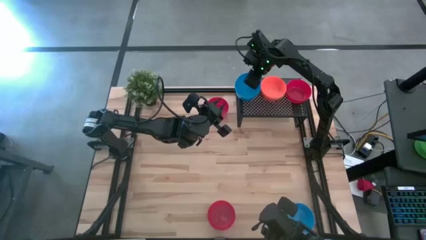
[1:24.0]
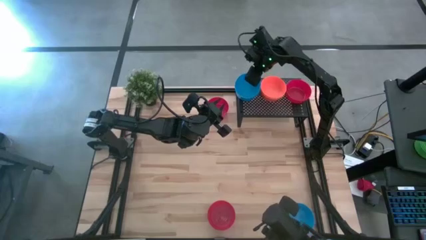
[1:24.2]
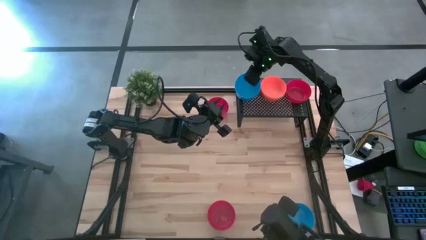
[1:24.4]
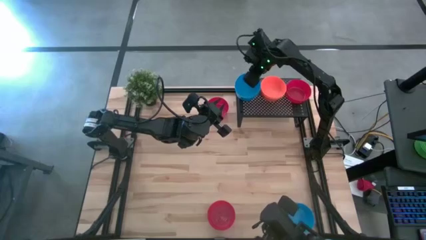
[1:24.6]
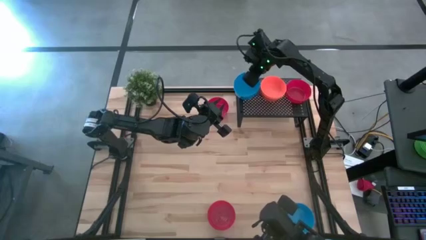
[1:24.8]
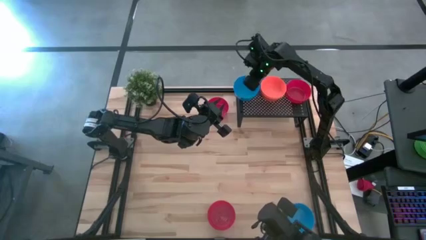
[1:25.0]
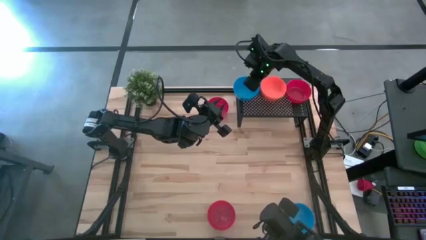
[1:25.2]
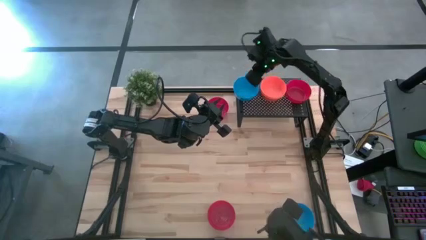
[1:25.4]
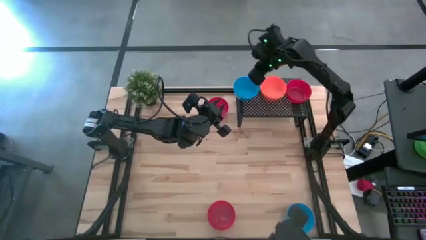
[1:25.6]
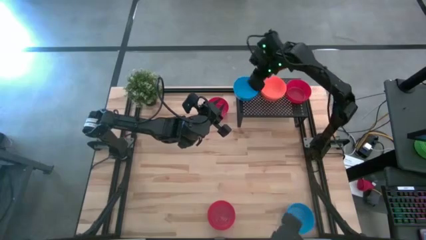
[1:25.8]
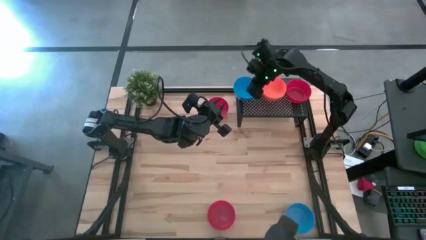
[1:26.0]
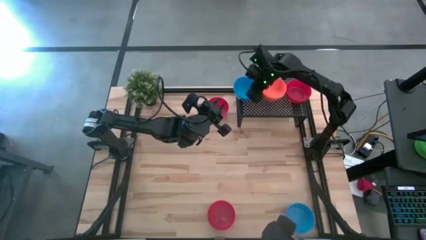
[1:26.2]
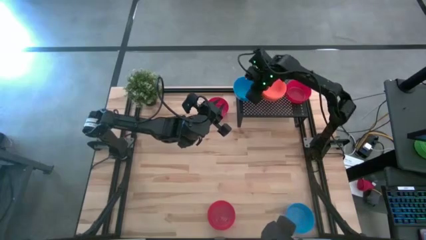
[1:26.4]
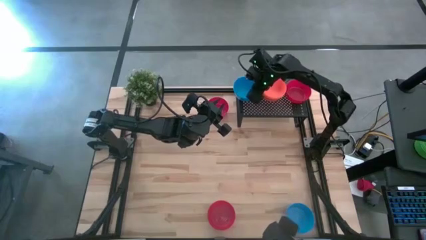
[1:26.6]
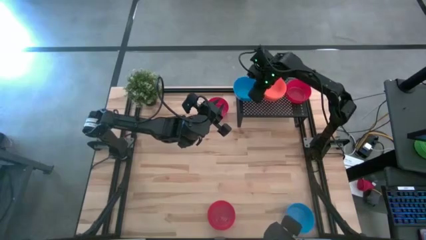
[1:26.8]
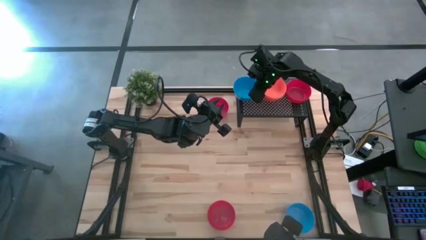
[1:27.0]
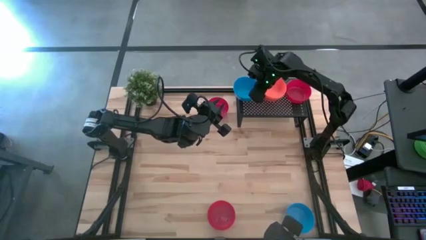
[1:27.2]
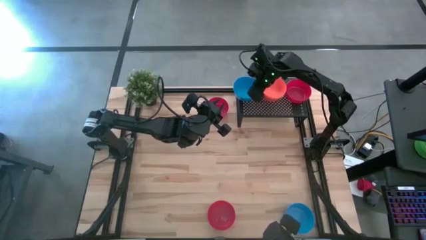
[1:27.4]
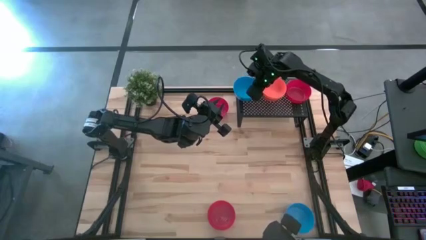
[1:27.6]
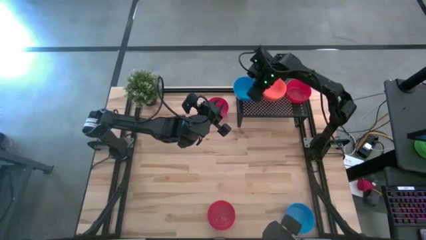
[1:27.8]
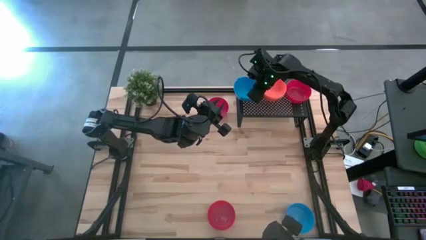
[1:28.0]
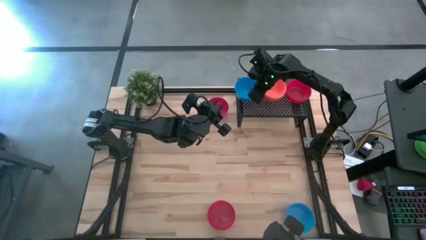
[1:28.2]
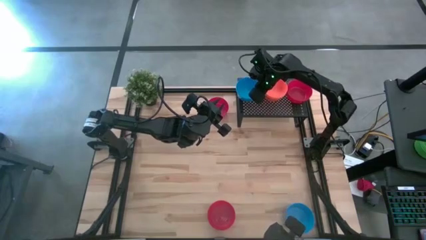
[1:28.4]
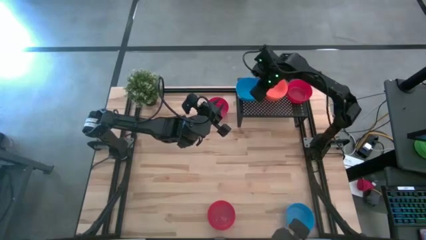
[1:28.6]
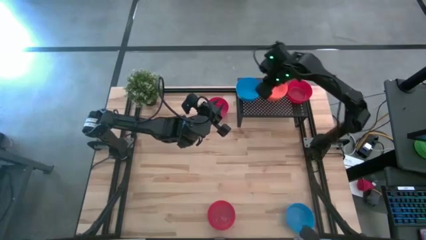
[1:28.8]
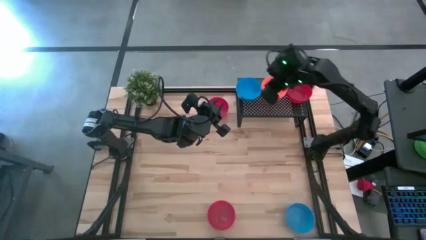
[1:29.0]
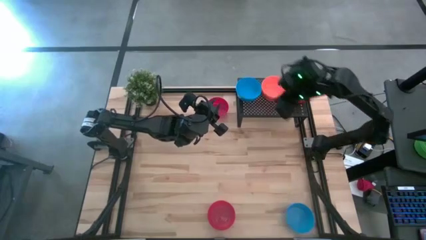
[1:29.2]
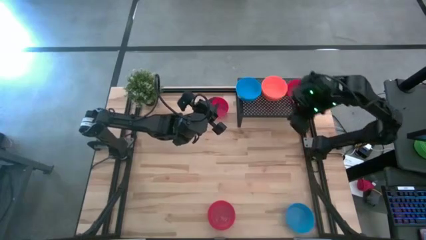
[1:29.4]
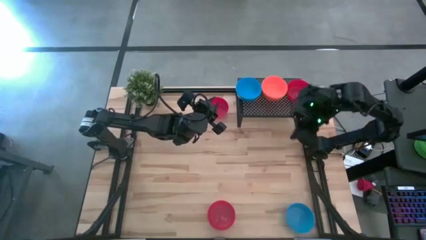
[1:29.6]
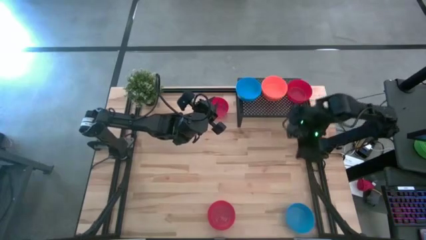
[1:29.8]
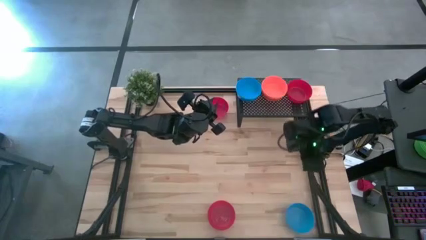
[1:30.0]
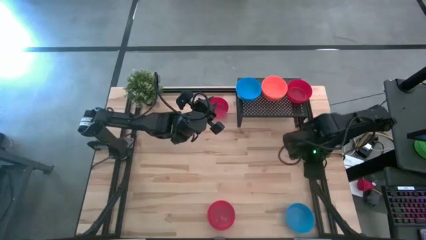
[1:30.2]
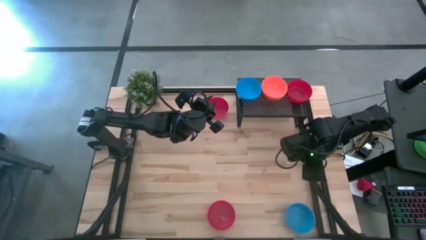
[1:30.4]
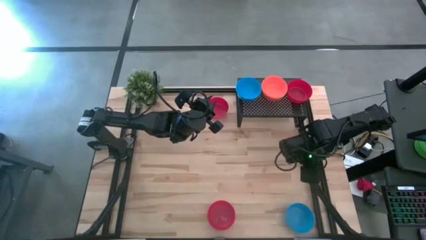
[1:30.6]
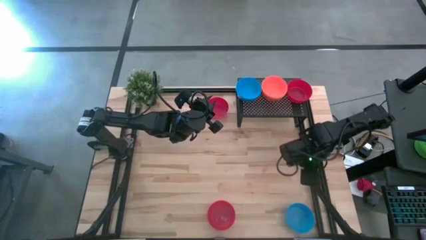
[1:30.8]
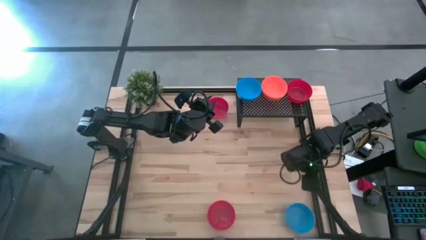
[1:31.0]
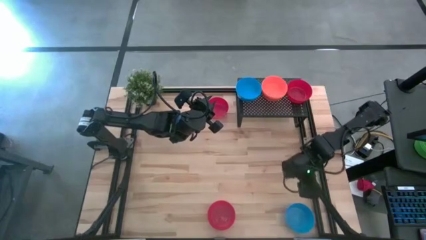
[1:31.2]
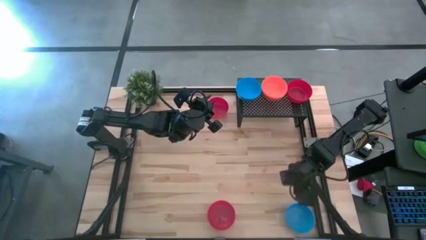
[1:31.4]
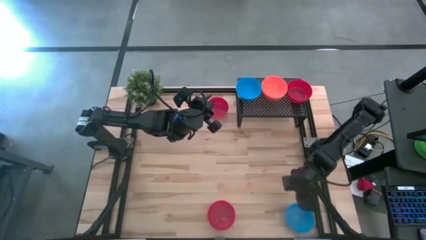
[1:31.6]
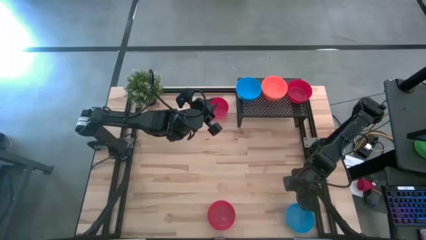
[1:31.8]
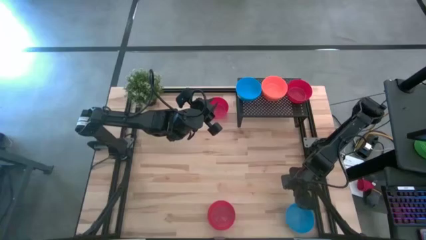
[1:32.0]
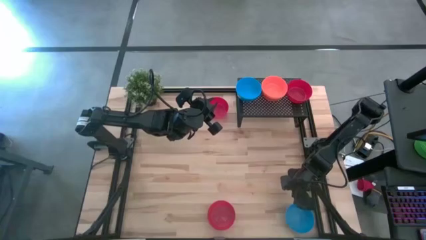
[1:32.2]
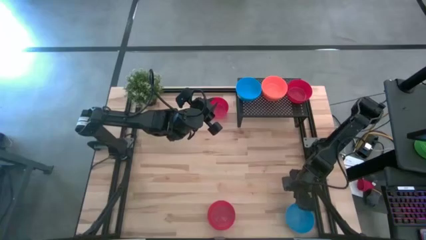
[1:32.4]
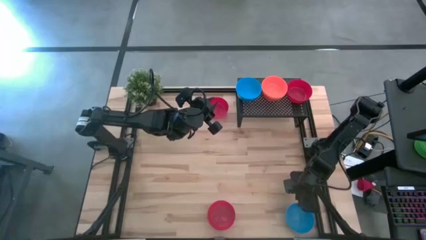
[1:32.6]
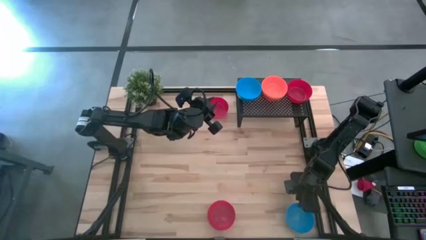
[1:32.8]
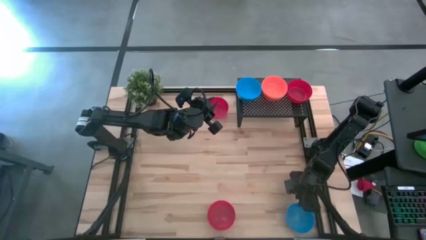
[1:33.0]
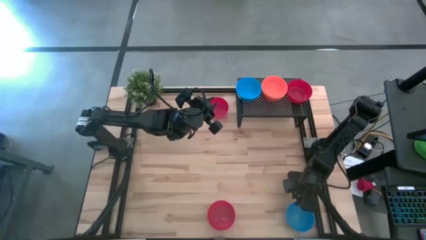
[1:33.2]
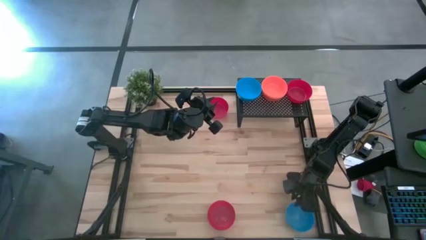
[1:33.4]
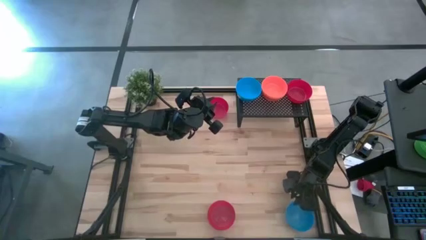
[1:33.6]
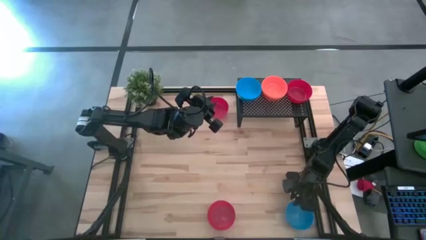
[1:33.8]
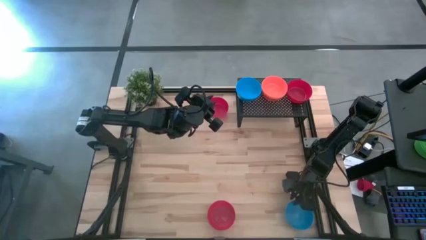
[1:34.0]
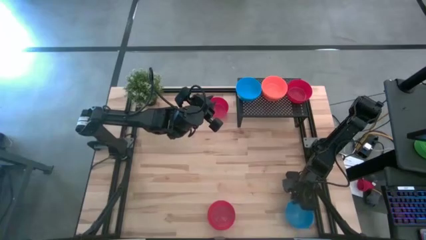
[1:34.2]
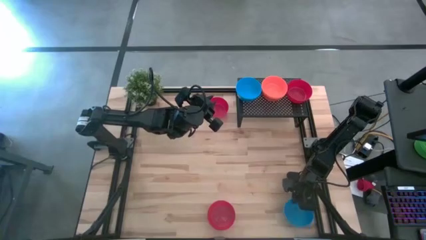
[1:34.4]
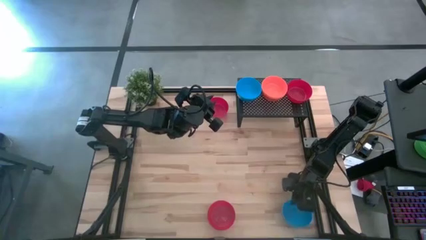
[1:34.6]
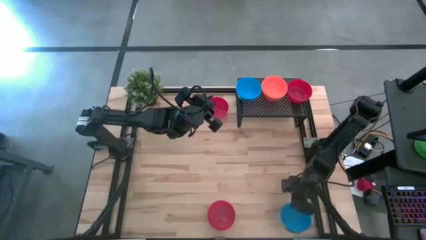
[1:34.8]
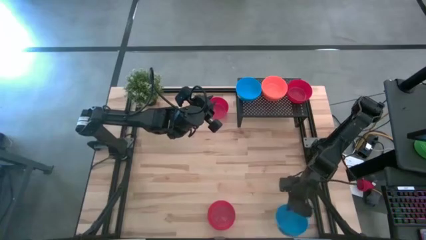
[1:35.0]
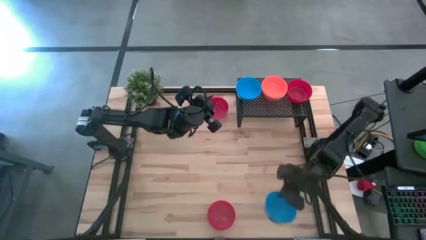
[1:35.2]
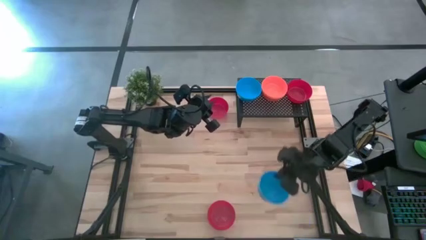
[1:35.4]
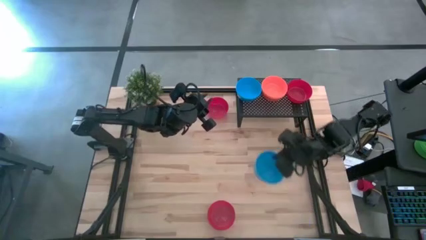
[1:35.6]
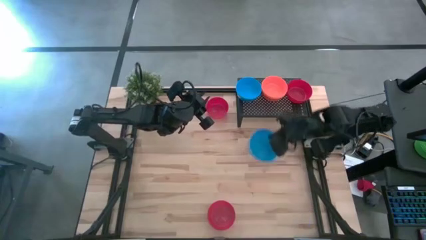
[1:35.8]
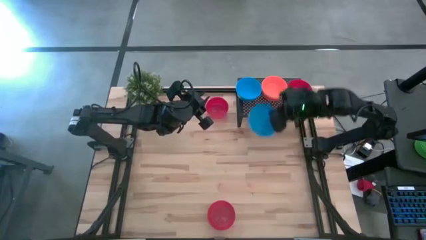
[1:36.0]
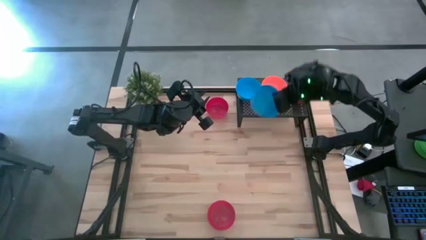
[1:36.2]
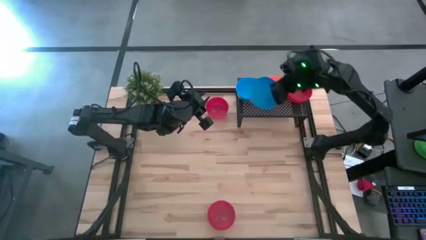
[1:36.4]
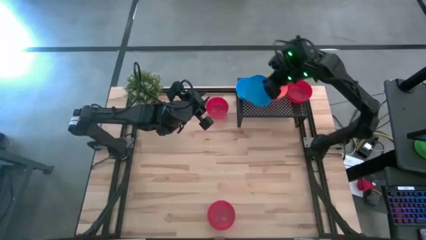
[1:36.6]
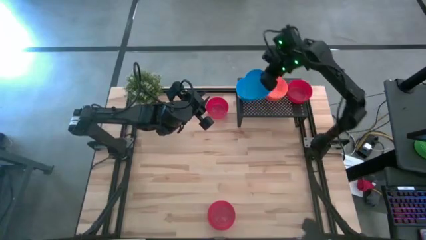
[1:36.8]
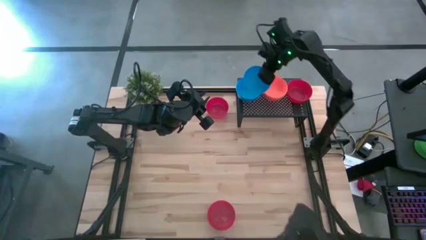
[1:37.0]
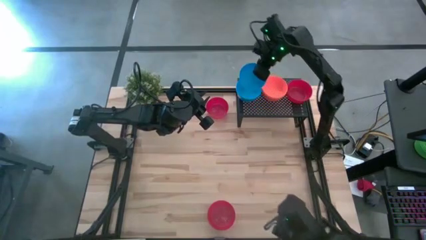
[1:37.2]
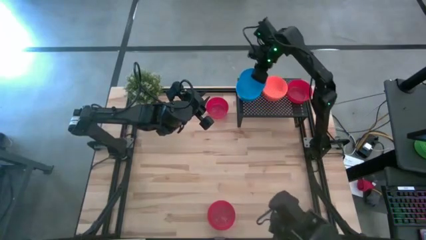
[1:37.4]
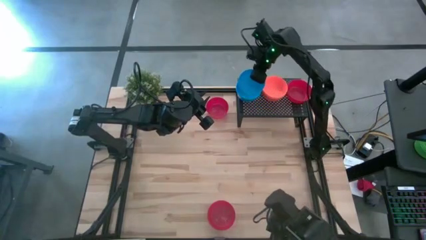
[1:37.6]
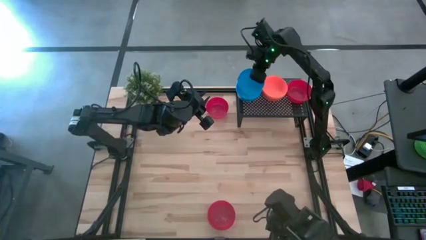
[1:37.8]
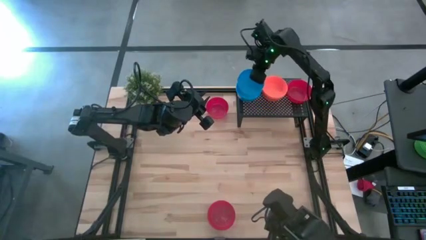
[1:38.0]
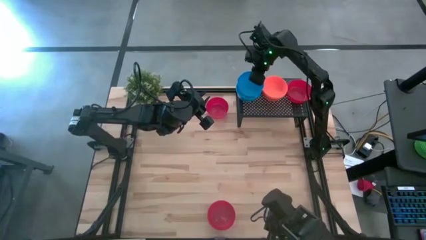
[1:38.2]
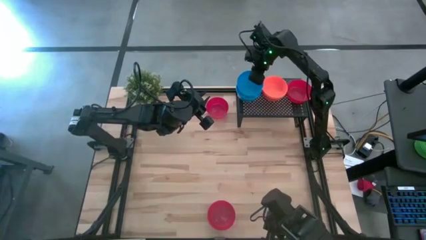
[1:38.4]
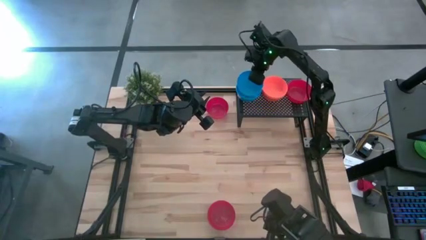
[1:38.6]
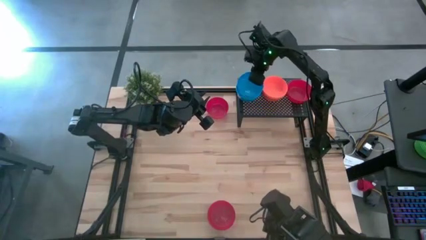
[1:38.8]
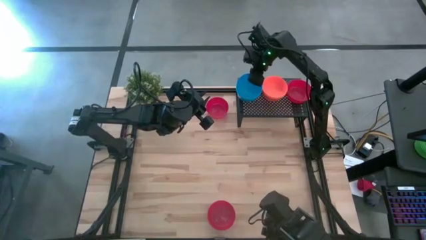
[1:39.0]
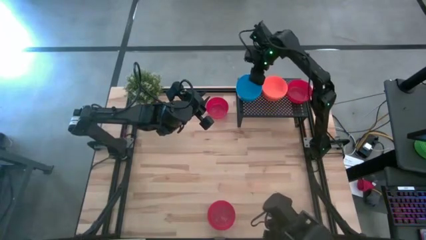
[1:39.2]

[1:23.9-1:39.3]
Task: Pick & Place Mini bowls
Stack the blue bowl on the blue bowl

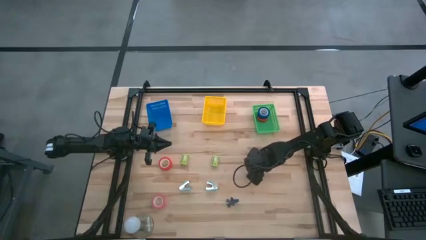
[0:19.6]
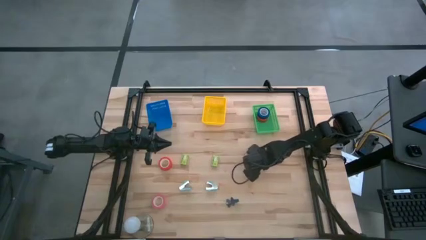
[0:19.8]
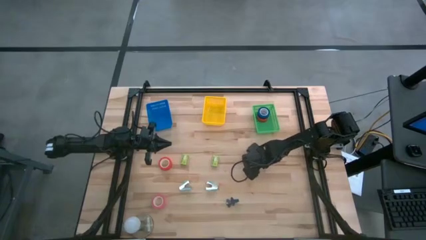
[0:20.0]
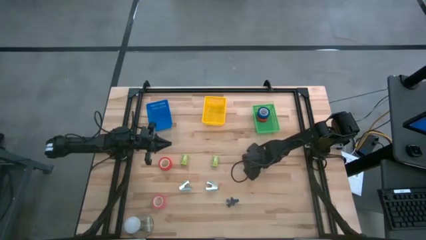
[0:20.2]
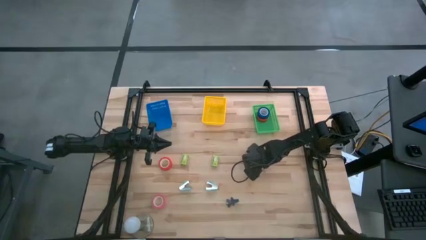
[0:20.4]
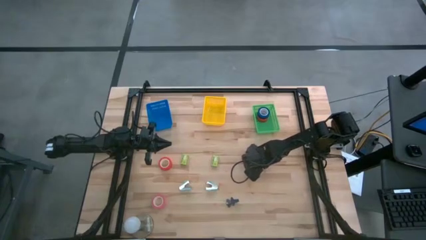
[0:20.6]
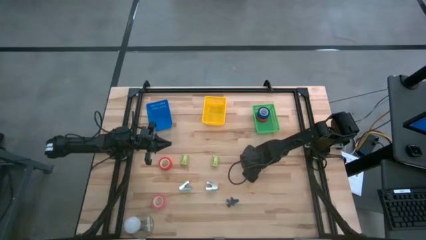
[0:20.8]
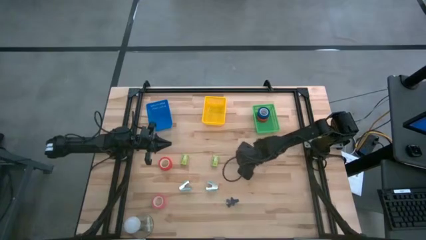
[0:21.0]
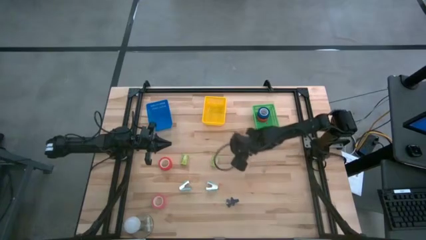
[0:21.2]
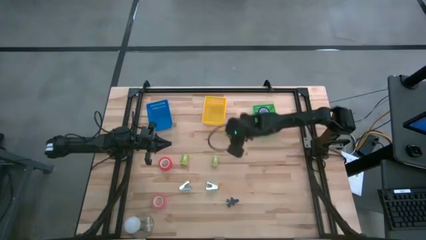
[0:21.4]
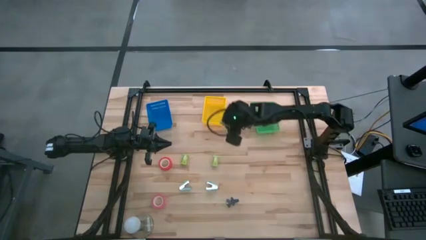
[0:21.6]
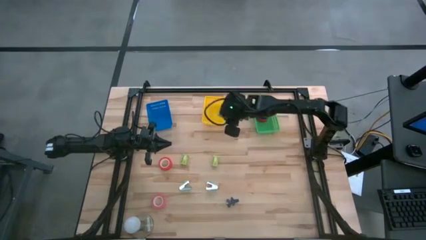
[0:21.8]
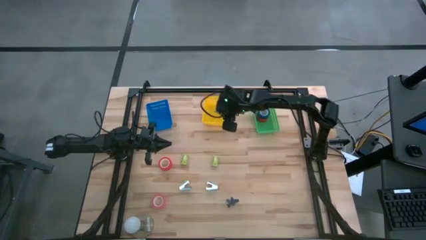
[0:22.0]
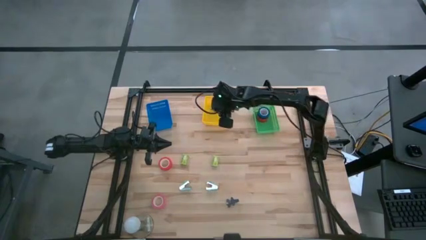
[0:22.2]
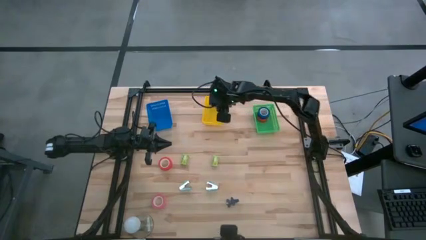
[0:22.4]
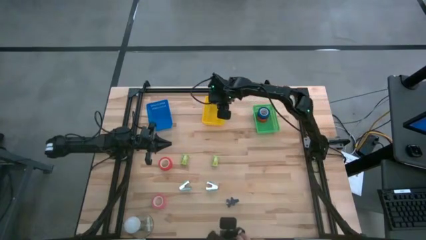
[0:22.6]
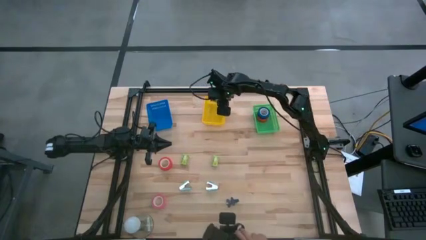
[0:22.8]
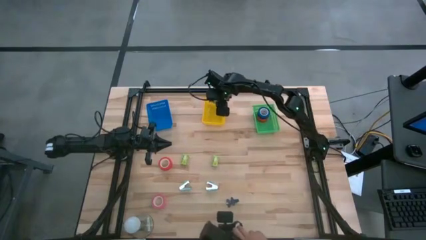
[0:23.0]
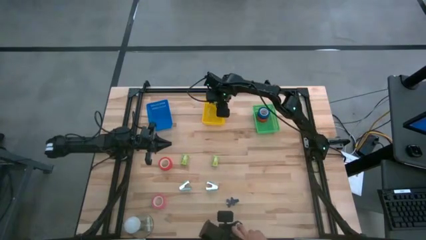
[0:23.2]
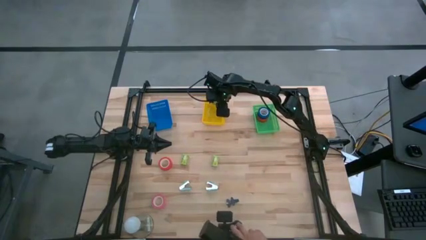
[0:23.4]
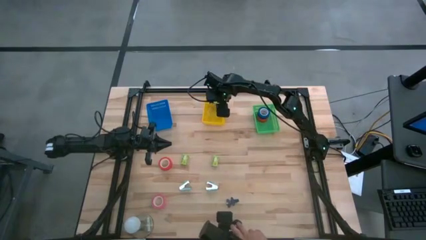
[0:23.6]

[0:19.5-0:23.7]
Task: Pick and place Stapler, Stapler remover, tape
Put the right staple box into the yellow bin
